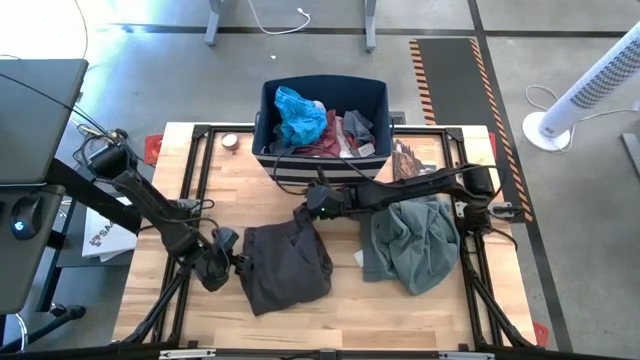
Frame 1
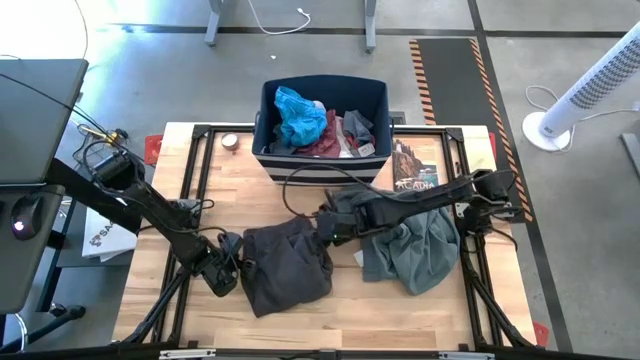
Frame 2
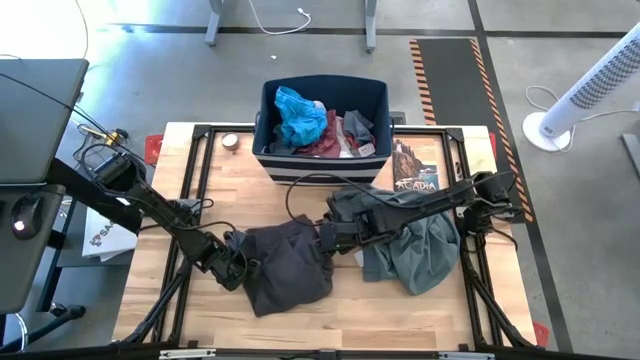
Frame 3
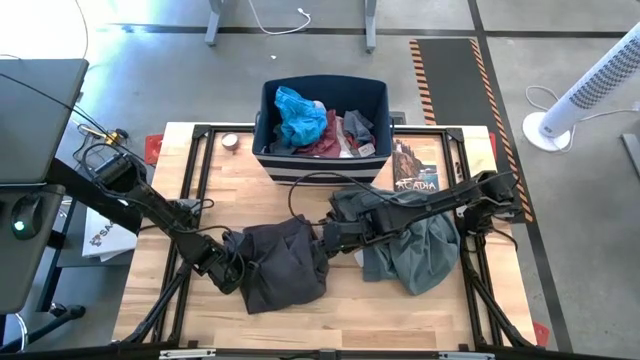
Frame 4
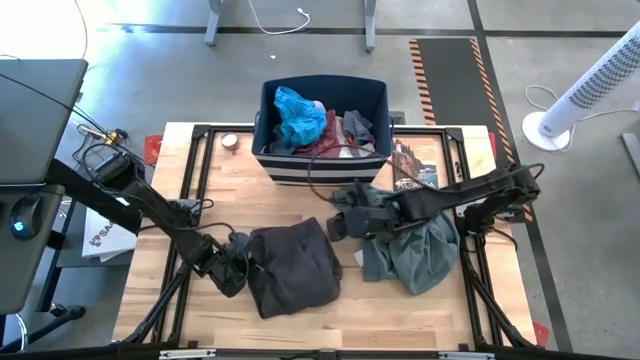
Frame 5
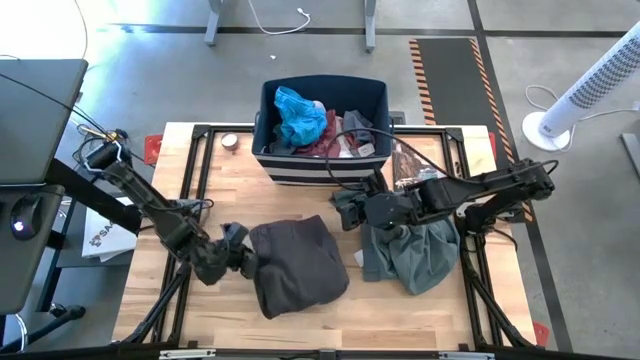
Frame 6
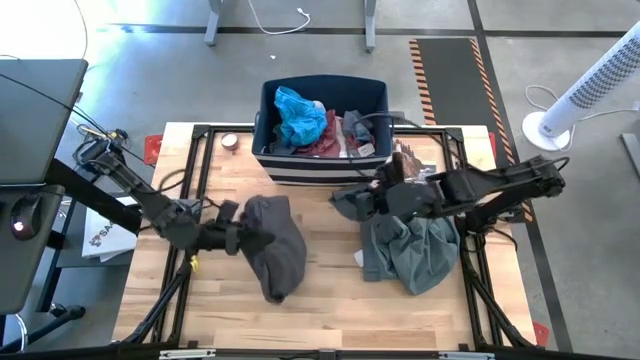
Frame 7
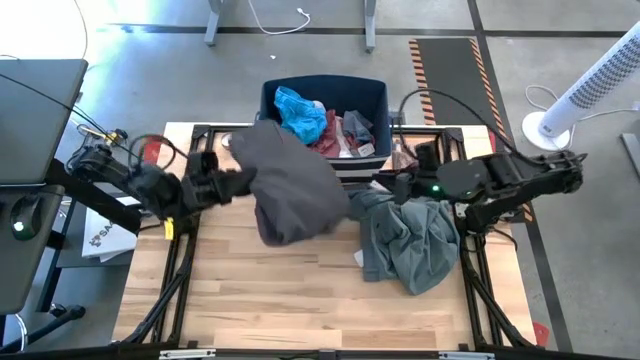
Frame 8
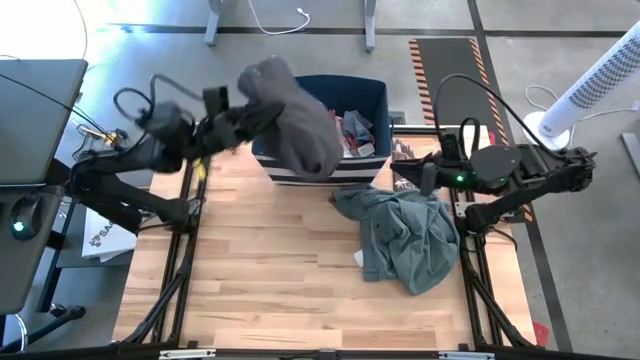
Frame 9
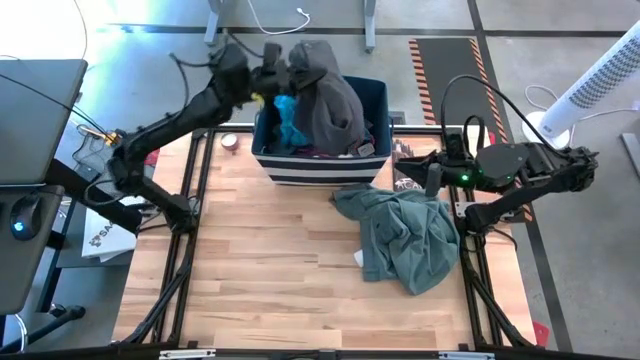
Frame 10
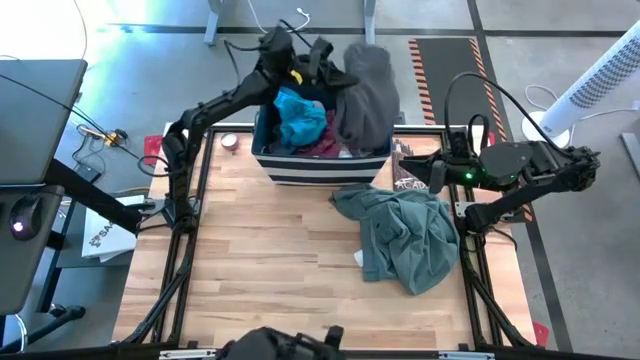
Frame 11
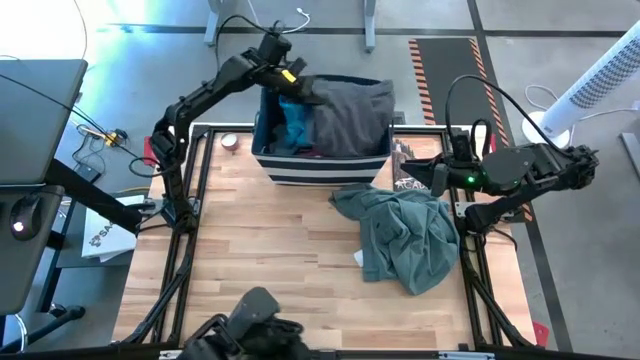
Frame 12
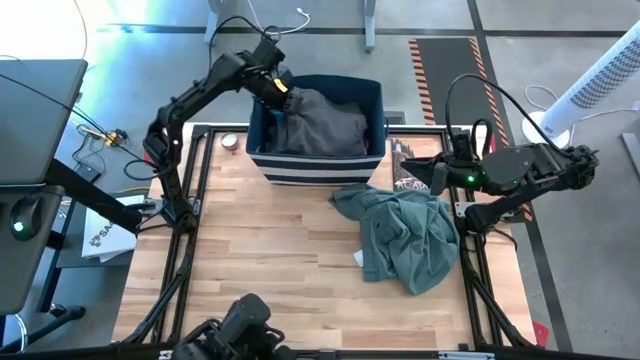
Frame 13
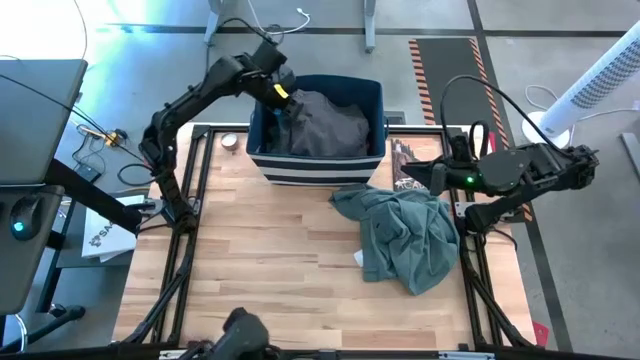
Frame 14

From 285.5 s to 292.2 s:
Task: Sort clothes
Put the folded dark grey short into the blue laundry bin

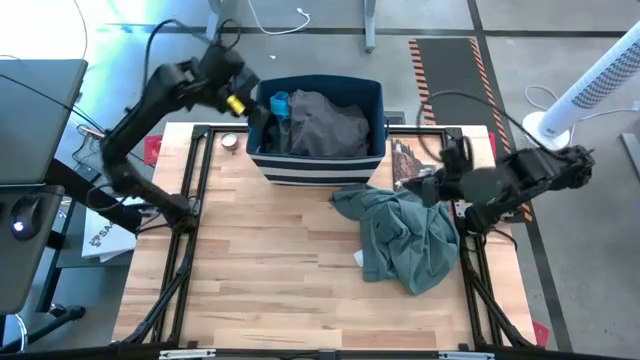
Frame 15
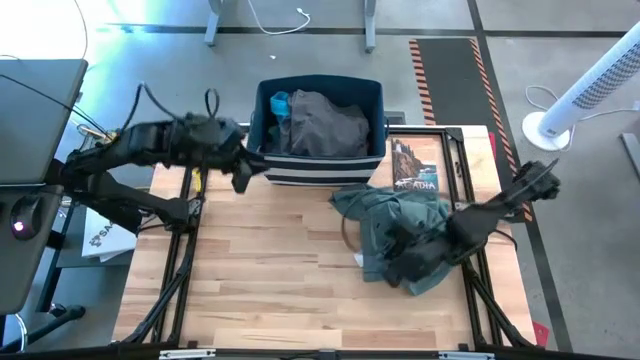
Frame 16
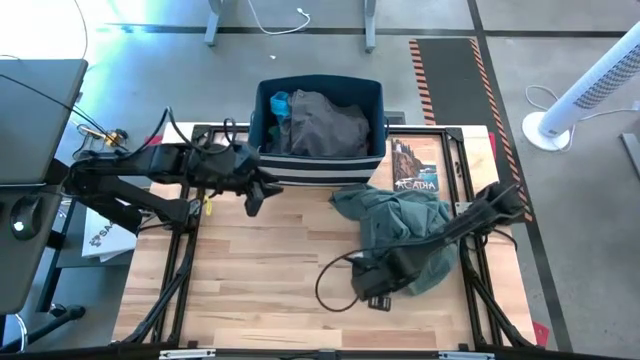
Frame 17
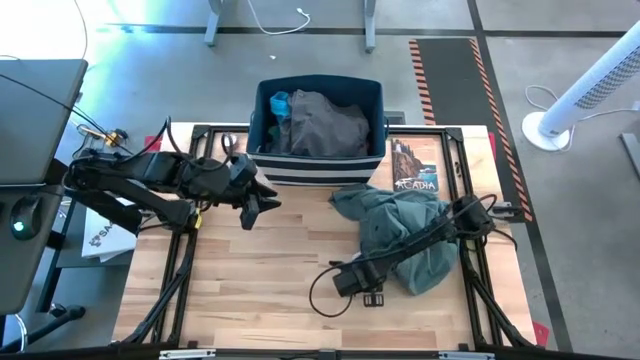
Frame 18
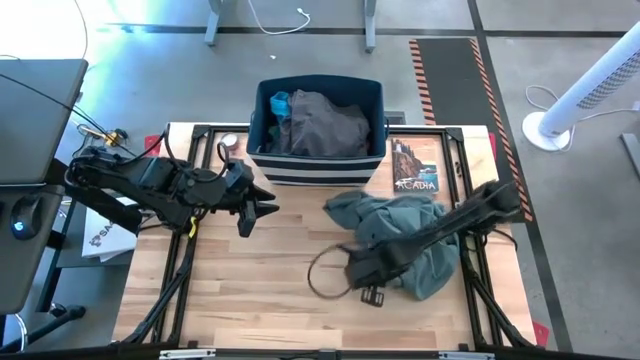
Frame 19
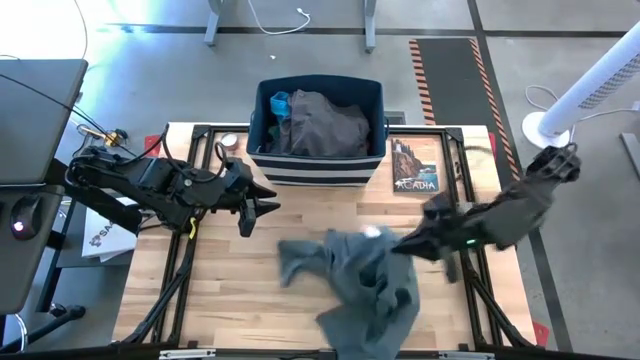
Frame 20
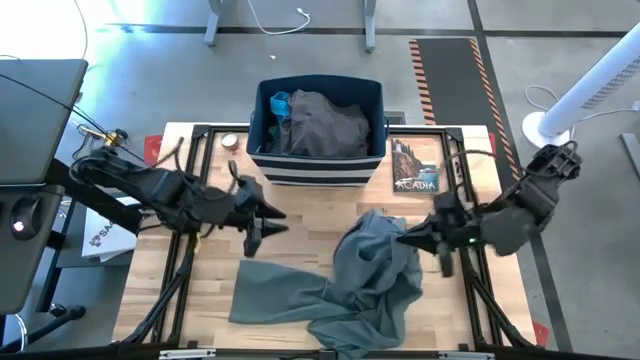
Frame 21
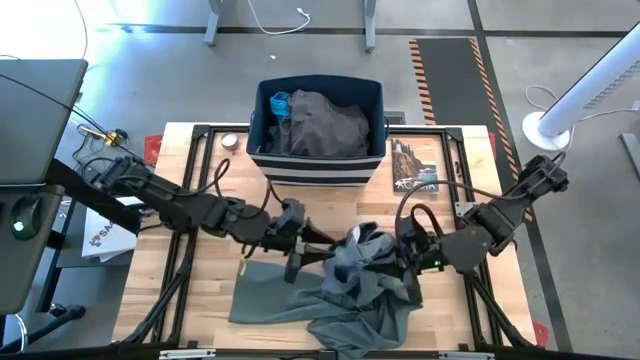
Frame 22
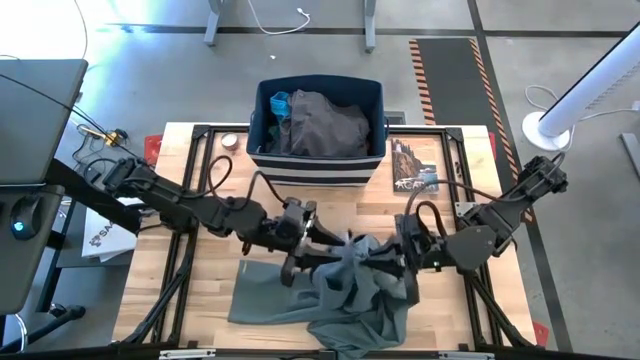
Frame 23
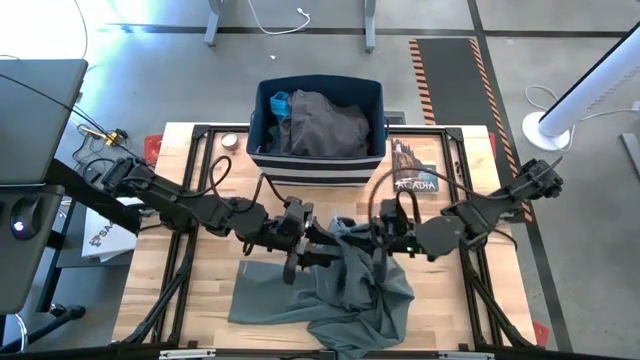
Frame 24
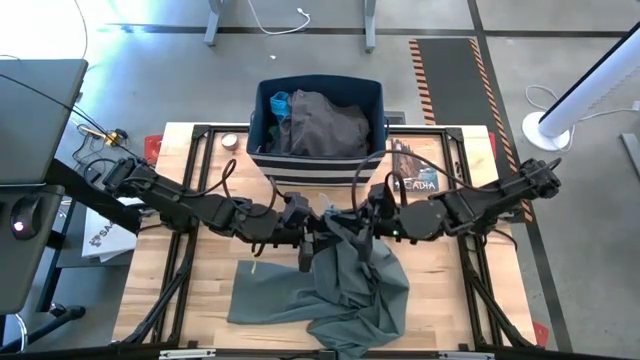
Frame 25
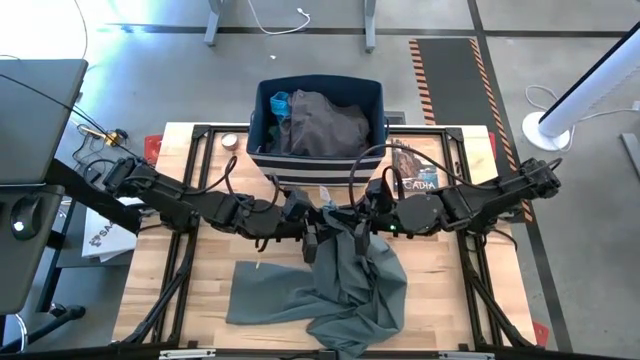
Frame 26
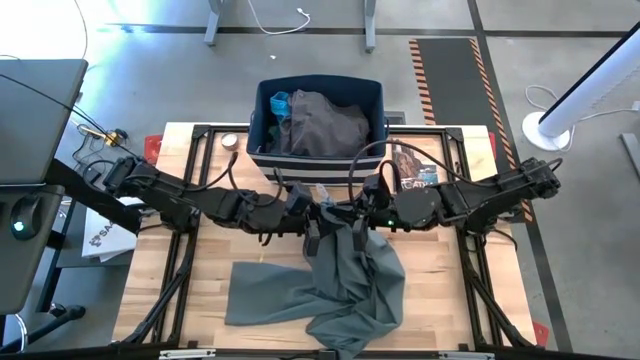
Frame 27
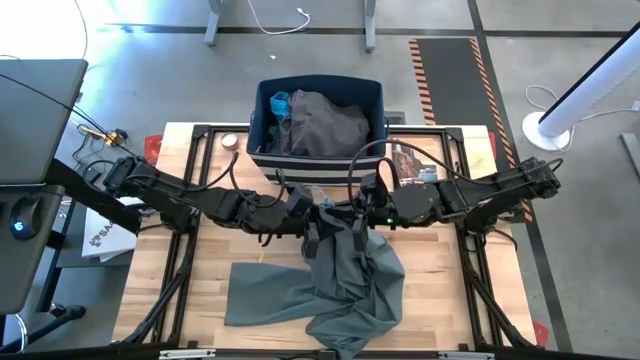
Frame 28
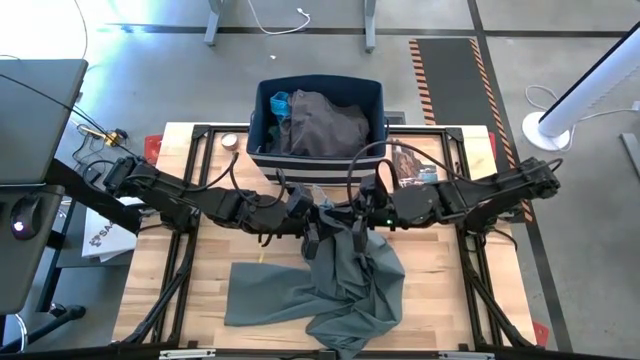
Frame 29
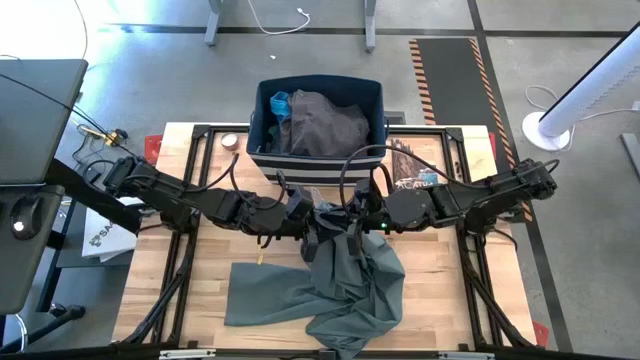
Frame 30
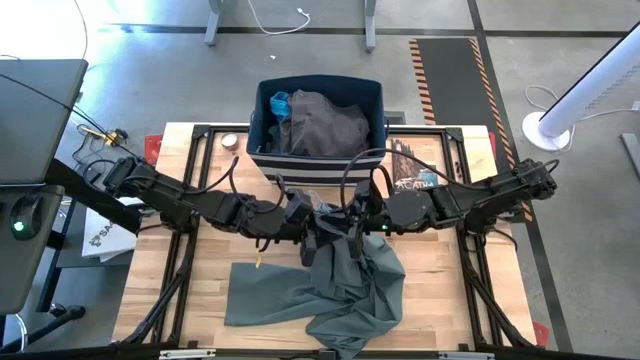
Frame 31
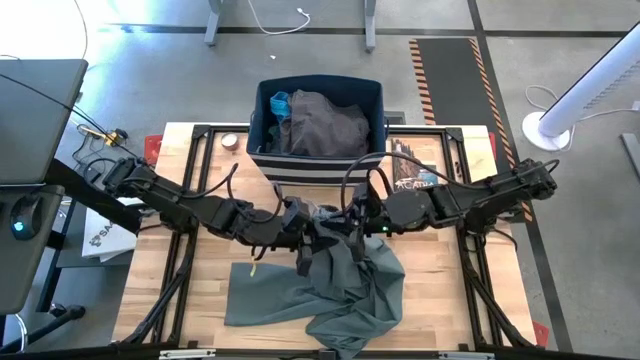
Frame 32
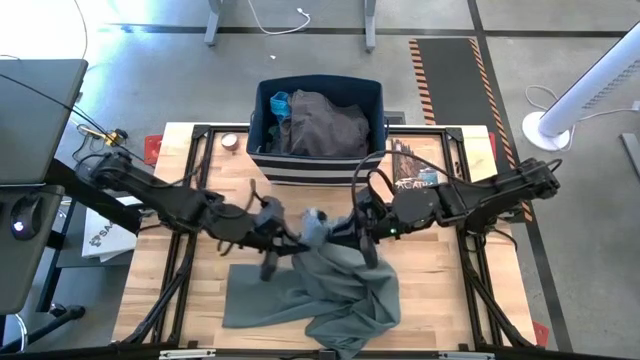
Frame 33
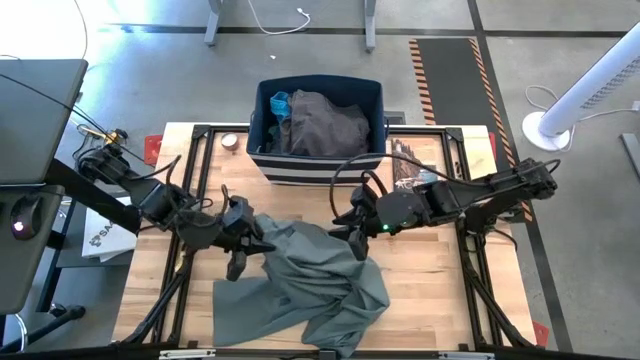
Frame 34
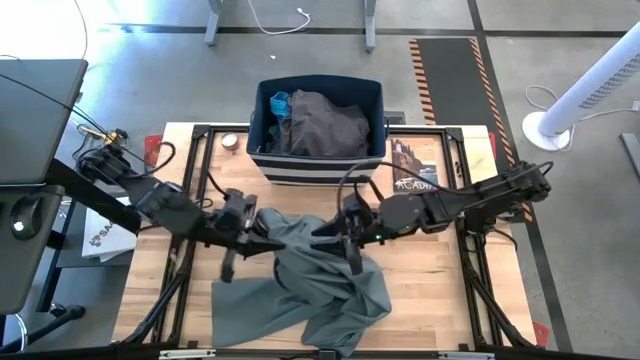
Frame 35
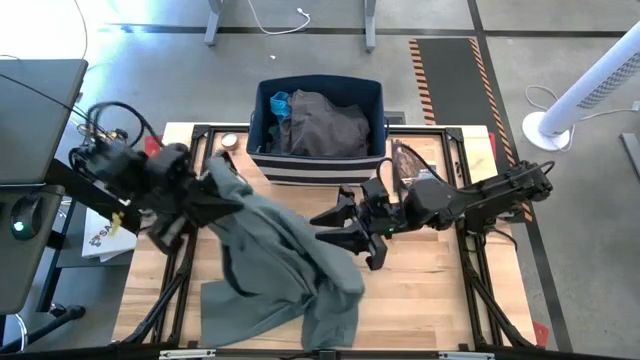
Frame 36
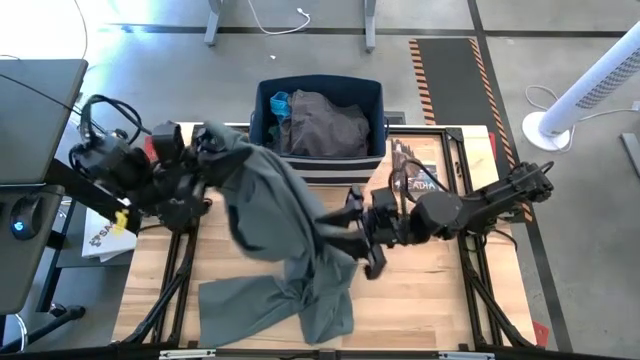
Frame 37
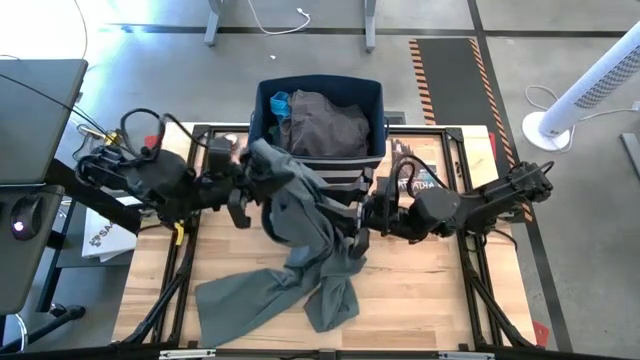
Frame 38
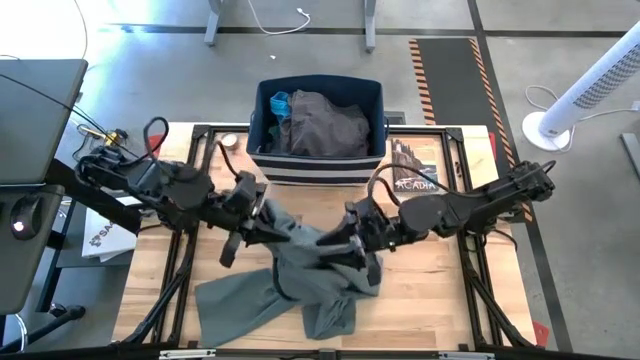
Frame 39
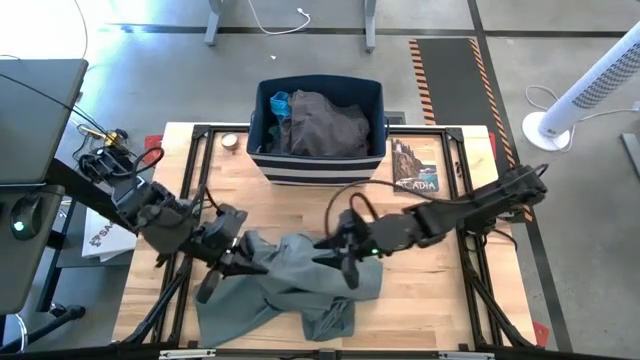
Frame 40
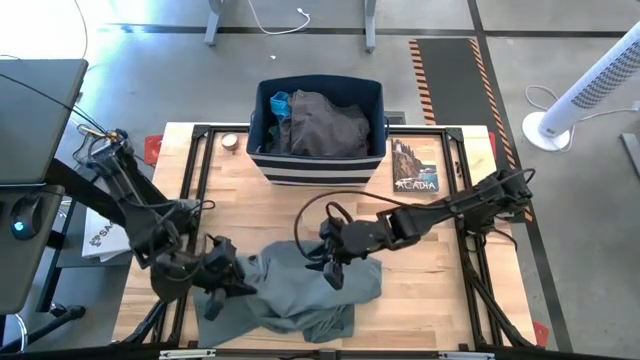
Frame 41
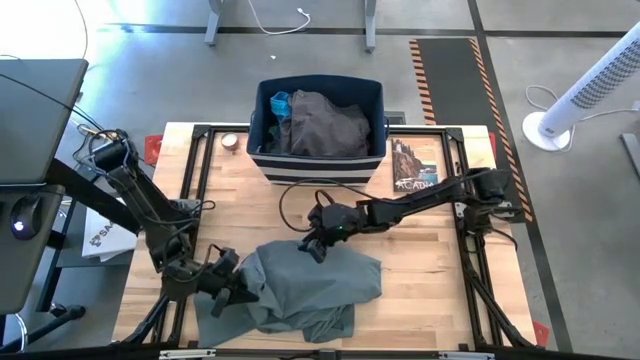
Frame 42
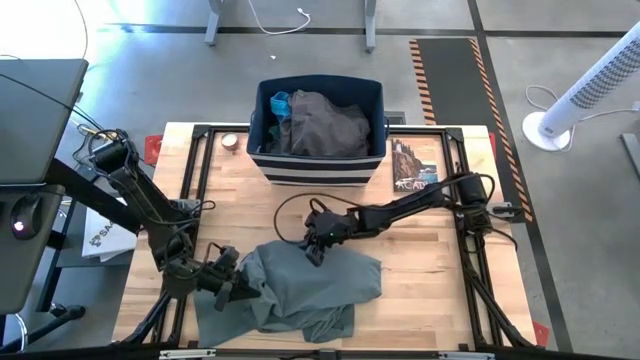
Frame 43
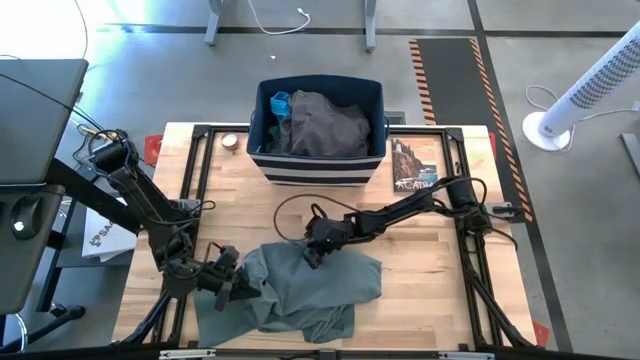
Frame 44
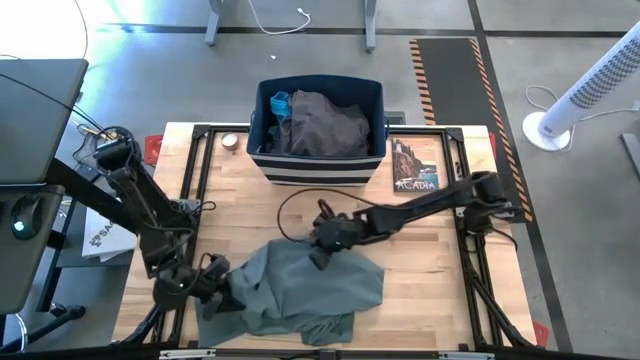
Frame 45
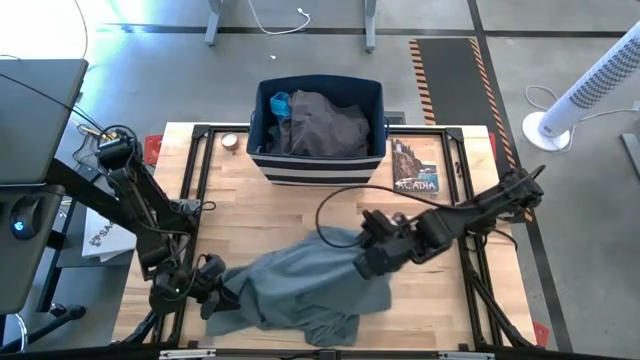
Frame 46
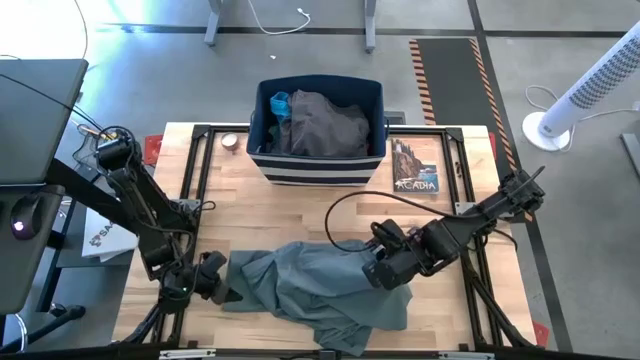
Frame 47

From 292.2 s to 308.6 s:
Fold the blue pants
